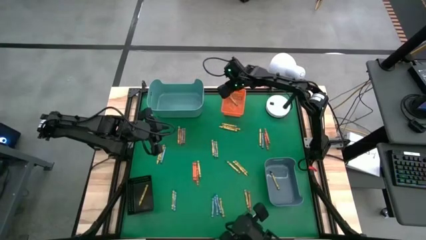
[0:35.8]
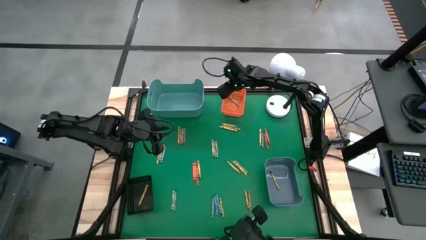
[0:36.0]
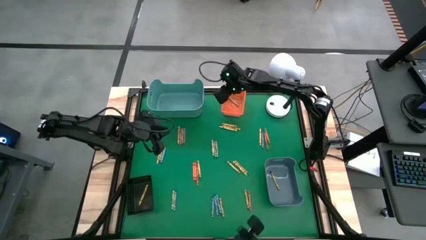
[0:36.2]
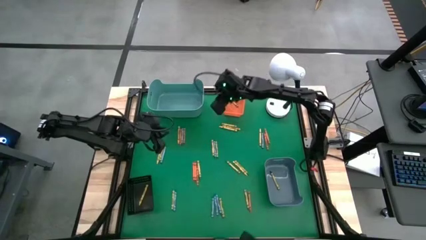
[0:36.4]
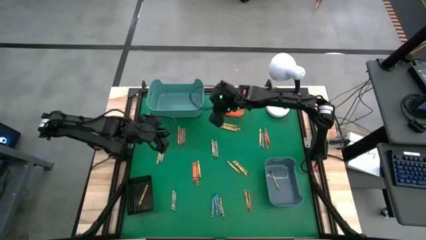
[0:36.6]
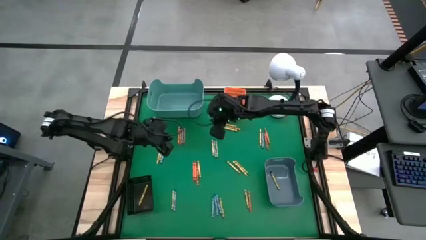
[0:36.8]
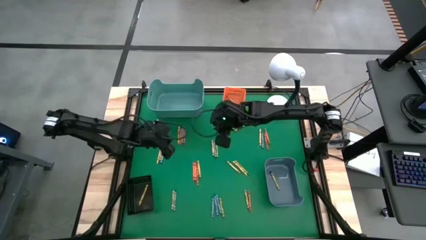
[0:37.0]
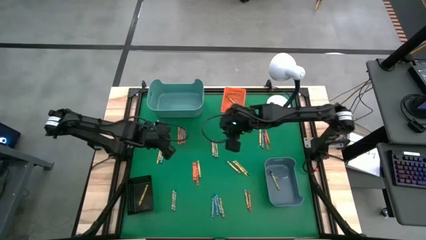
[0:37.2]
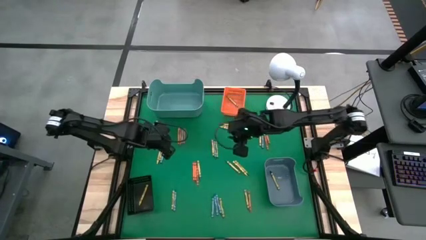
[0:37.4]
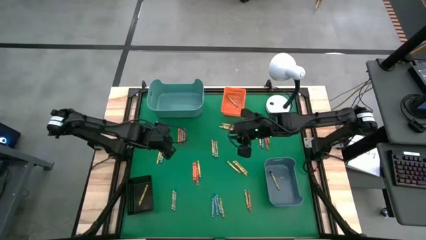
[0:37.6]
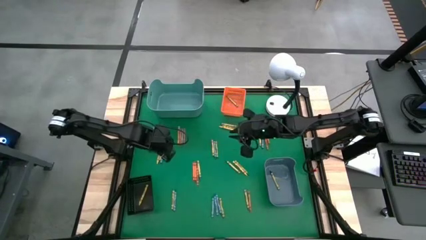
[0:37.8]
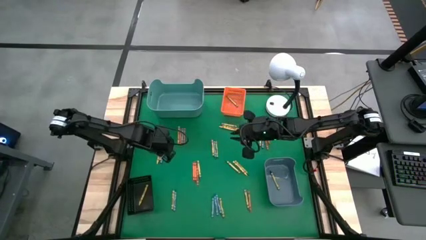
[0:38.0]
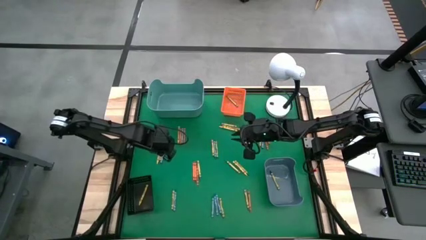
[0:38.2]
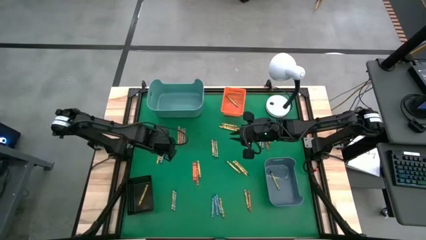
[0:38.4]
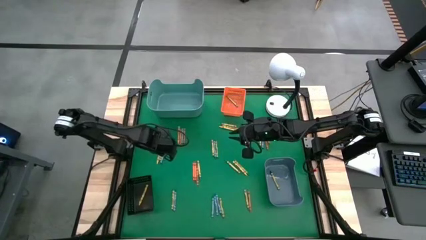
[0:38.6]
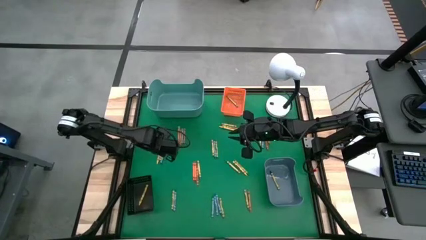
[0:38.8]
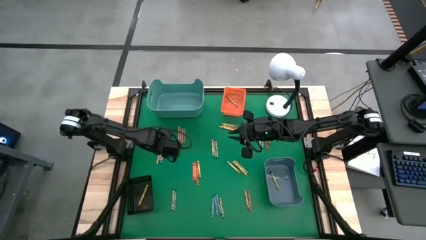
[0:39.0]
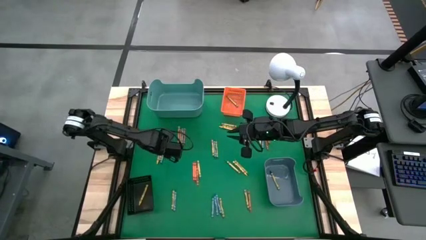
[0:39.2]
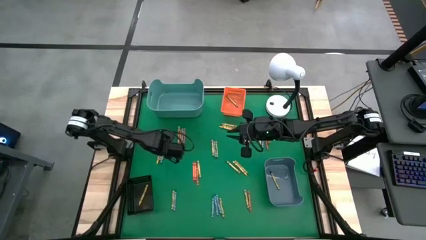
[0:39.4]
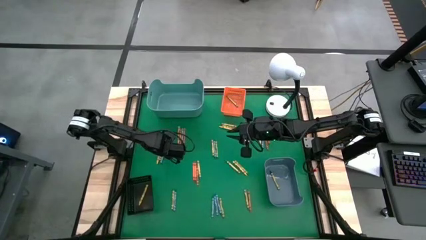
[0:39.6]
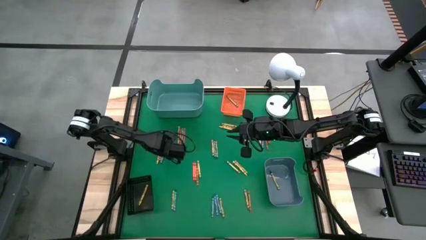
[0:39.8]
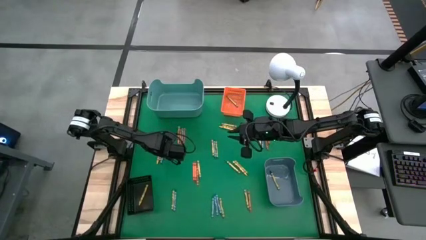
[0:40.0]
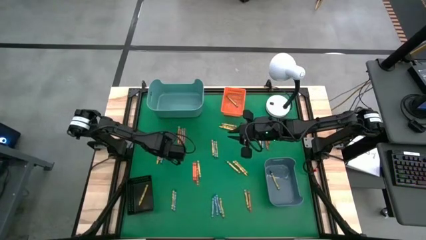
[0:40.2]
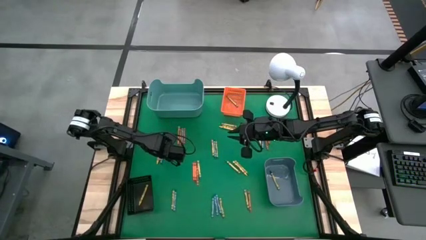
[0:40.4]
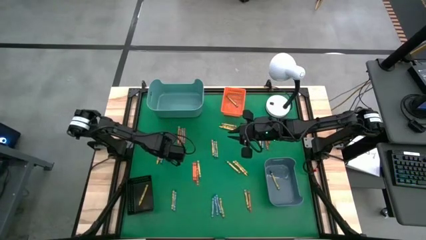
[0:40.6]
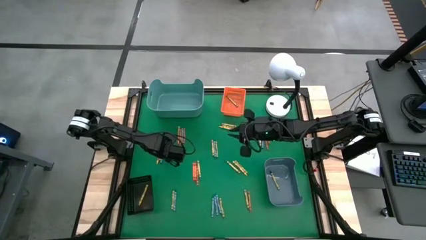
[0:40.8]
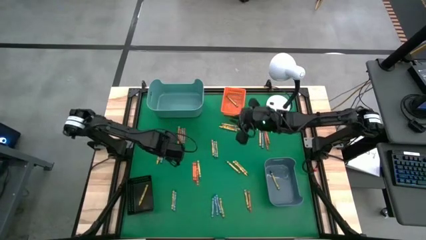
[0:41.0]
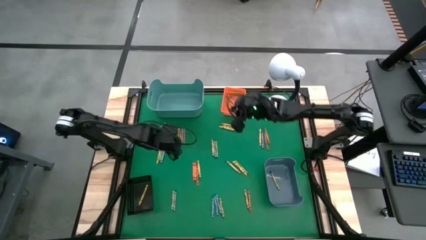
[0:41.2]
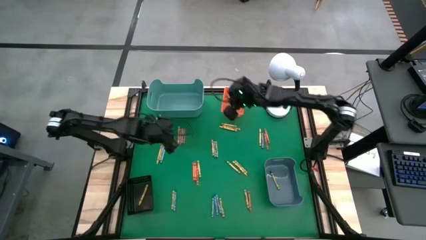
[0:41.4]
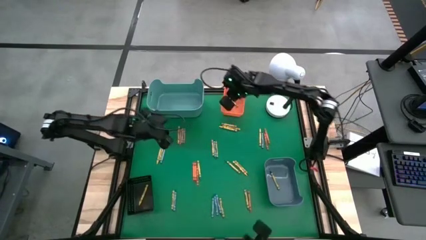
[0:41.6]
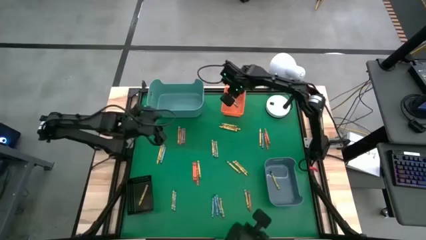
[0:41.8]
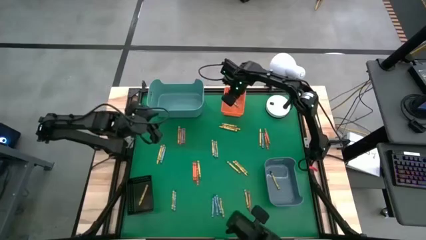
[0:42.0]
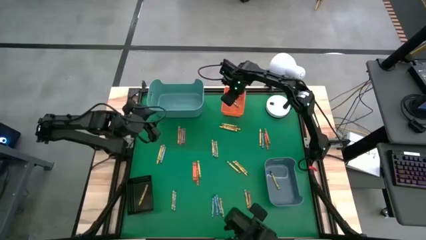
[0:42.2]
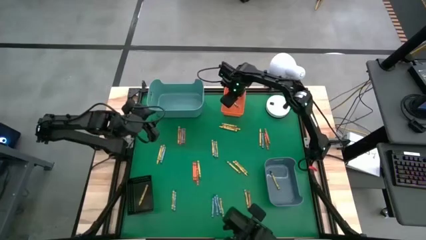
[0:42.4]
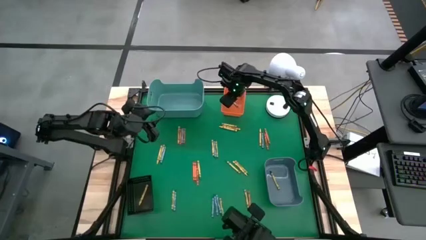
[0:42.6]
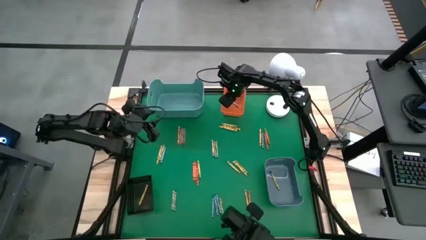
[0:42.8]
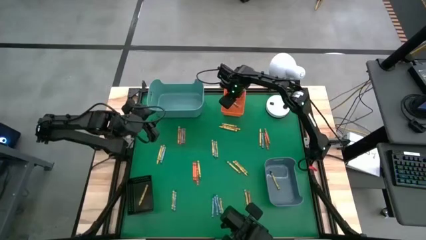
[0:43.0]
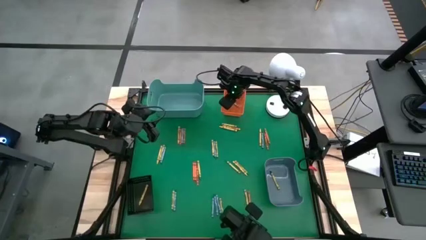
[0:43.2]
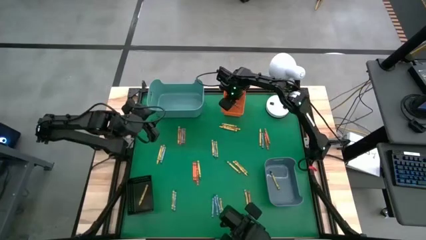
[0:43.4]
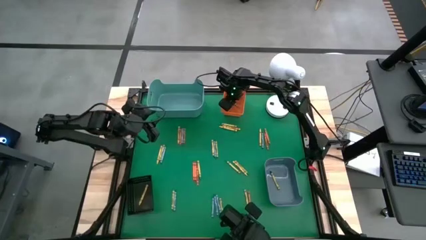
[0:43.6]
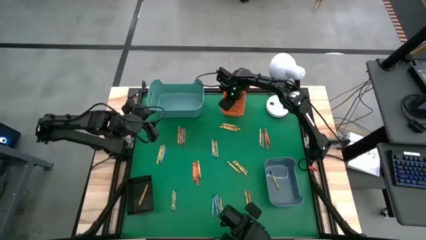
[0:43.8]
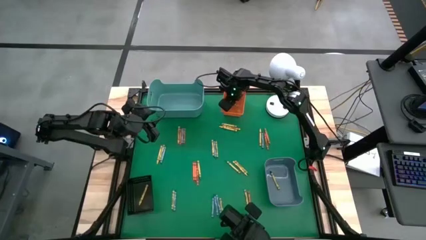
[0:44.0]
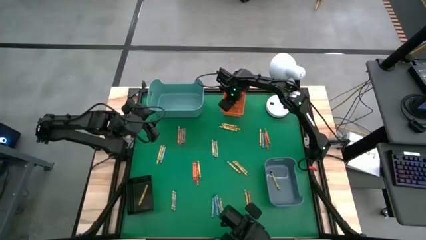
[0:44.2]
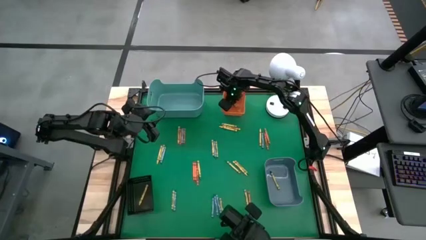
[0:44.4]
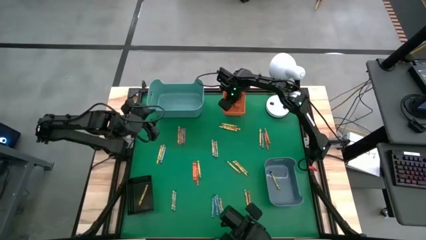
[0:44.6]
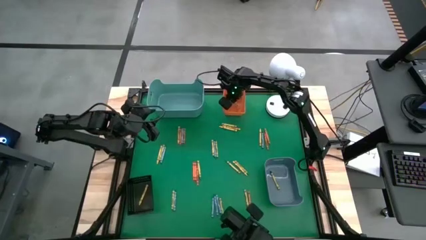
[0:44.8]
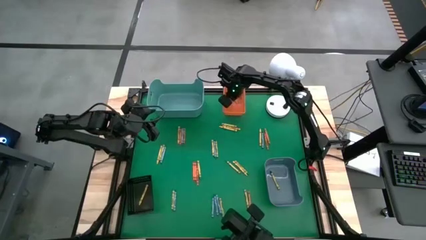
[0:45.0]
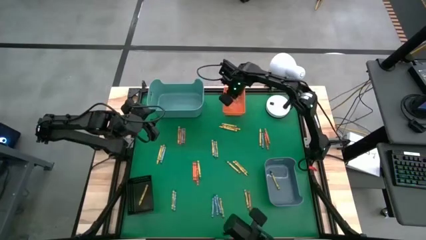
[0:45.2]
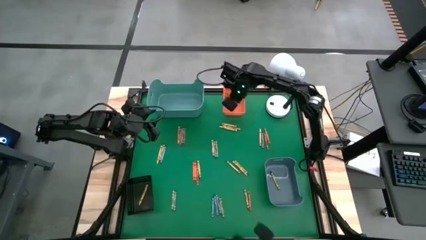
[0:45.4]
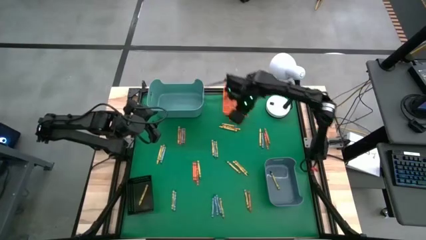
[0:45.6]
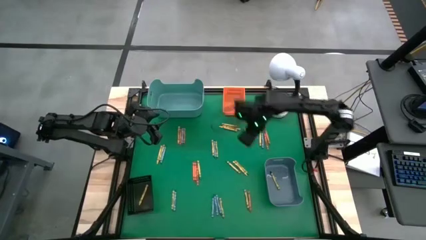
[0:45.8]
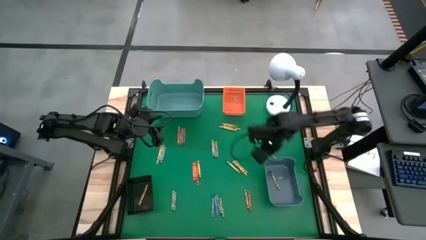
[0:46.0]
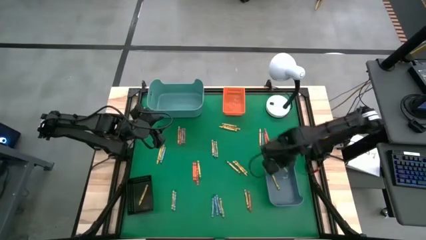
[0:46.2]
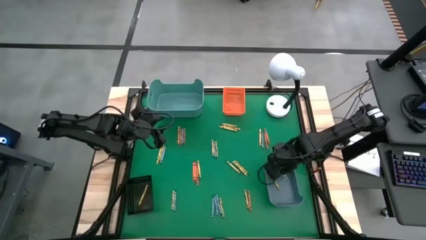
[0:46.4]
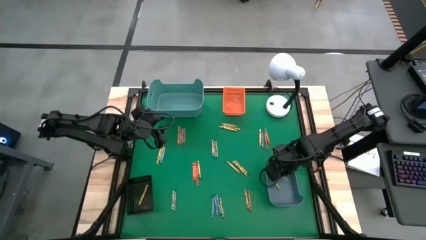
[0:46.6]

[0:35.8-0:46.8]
Task: Sort crayons
Put the green crayon into the blue bin

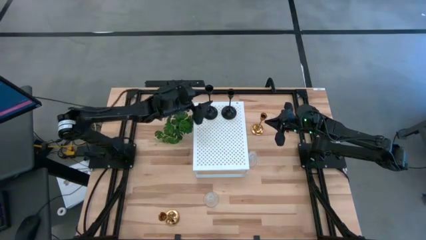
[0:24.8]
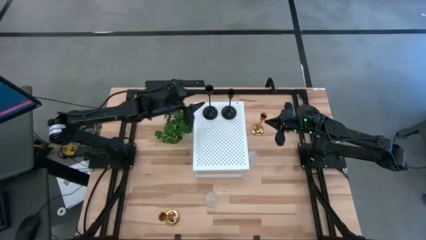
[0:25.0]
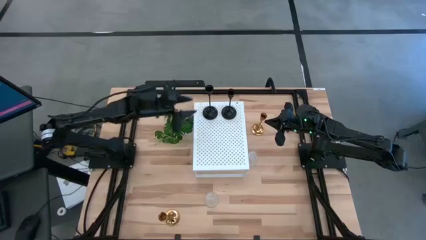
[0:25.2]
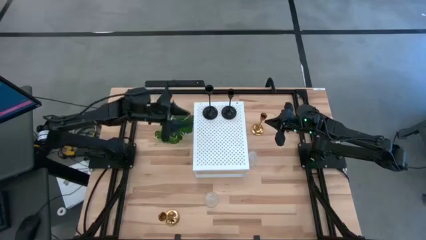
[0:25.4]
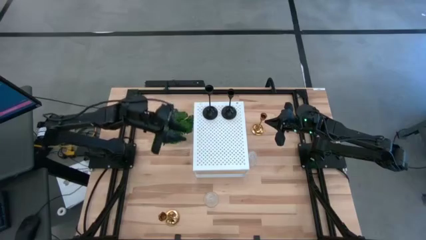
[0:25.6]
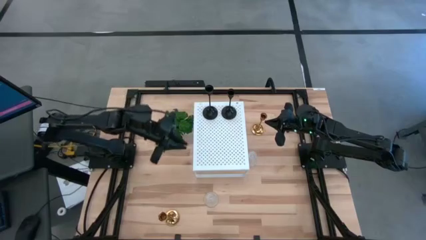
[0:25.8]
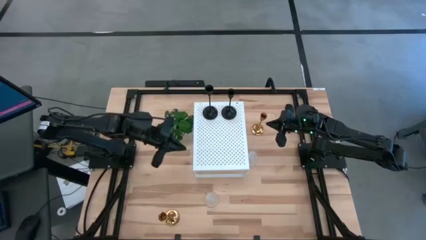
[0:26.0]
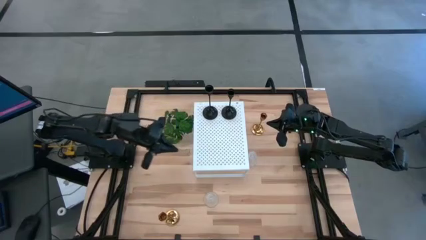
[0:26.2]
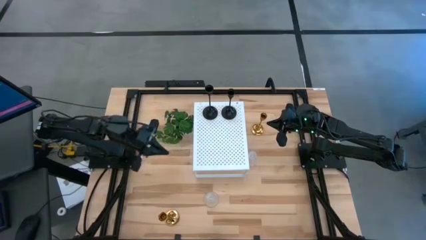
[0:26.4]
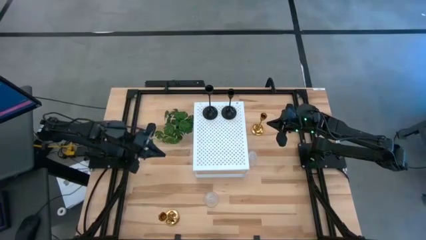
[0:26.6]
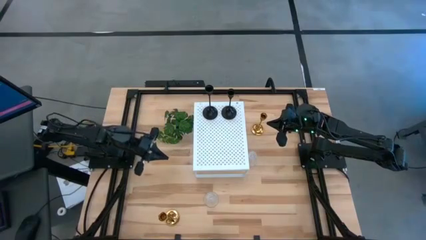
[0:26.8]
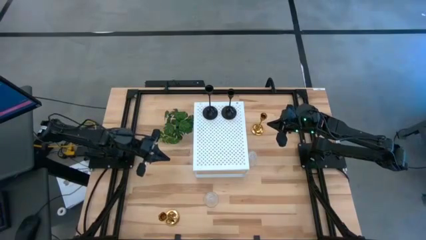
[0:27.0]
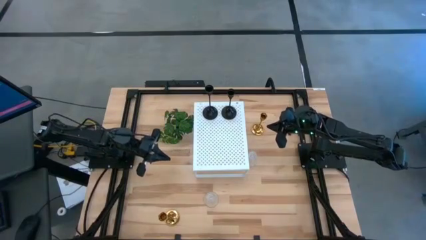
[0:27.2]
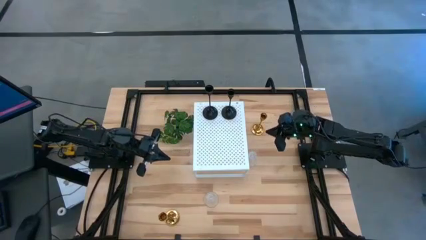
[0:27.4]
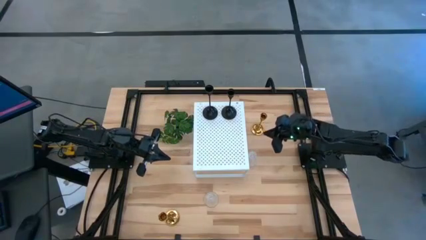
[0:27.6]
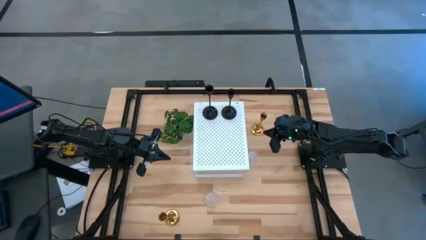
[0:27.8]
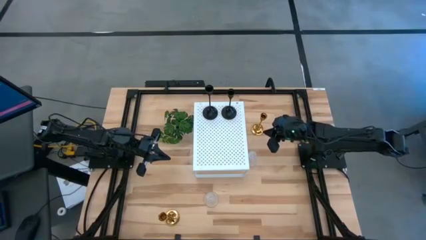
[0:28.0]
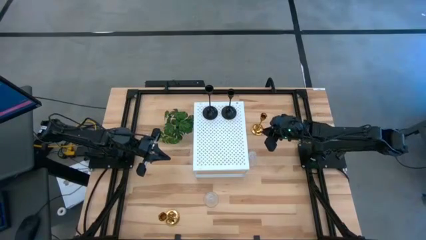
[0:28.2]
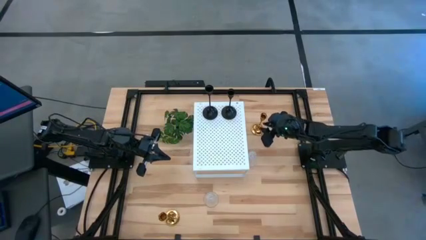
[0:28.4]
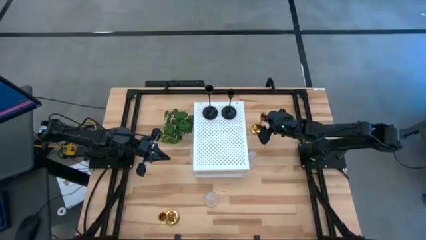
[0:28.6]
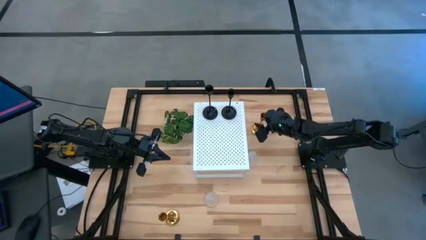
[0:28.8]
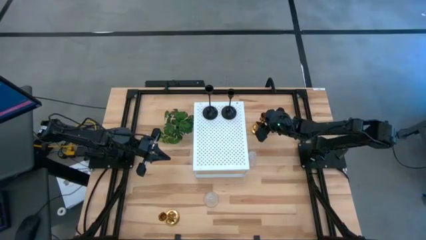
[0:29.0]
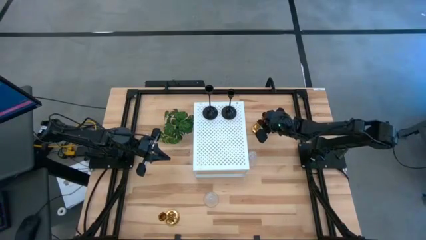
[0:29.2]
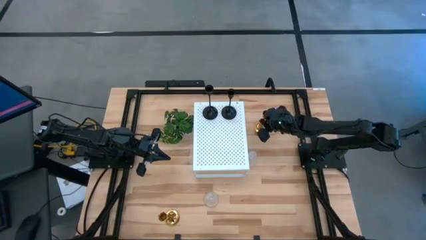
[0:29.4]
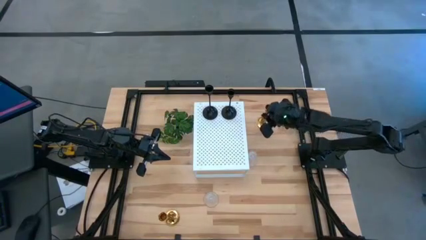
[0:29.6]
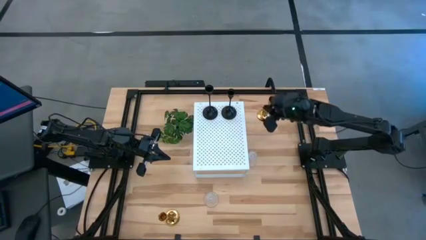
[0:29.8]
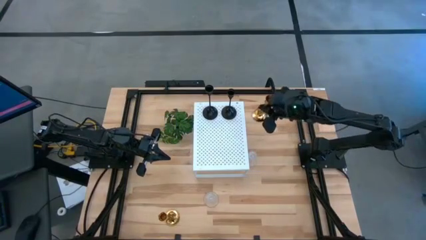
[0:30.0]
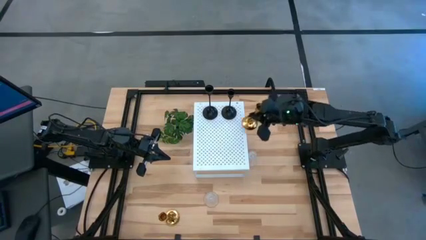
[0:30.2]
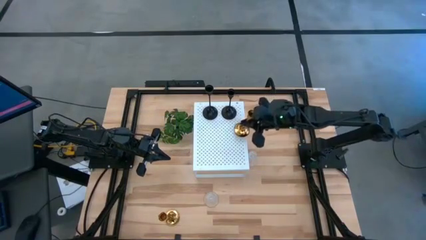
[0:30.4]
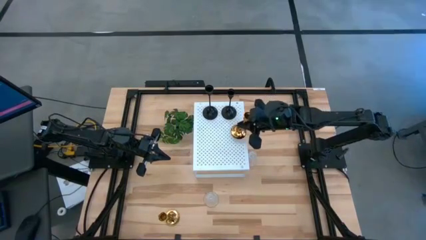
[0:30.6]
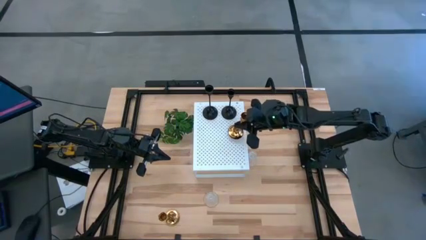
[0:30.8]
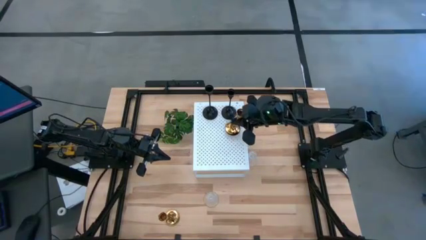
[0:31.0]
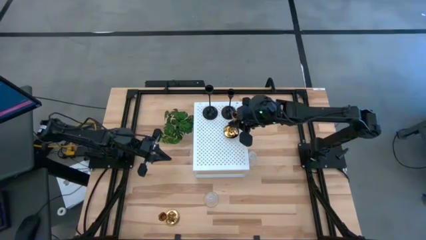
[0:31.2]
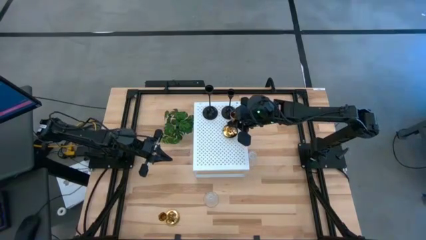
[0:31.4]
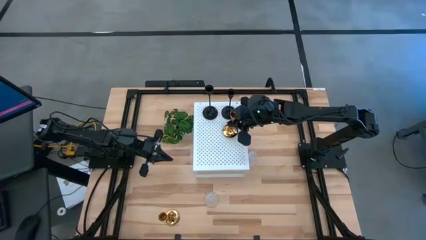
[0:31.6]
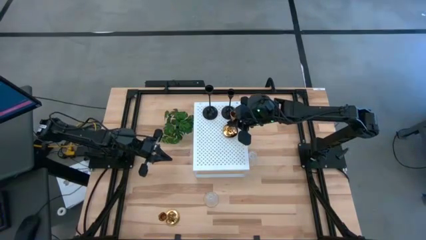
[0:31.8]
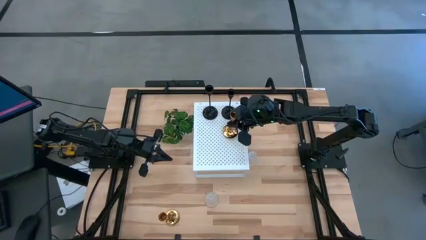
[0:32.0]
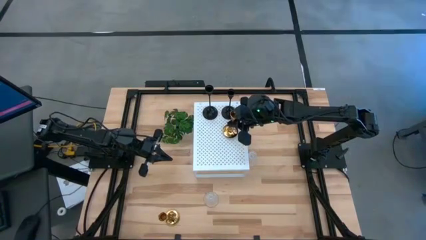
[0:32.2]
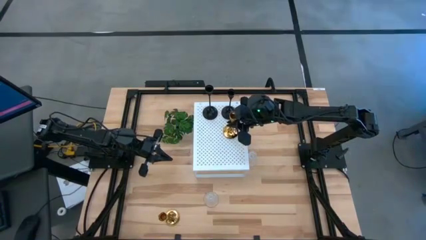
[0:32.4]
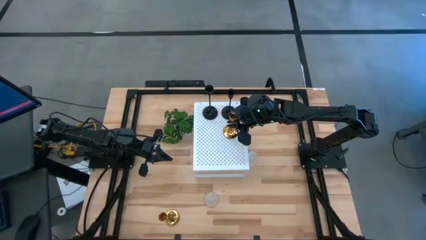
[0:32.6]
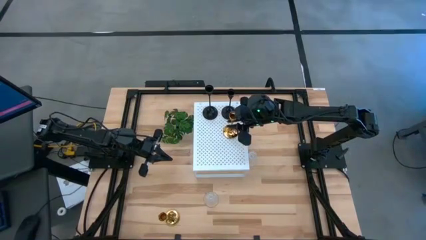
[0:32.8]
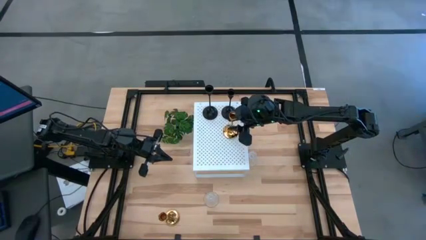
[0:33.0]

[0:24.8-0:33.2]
Task: Pick & Place candle stick holders
Put the top gold candle holder on the shelf
